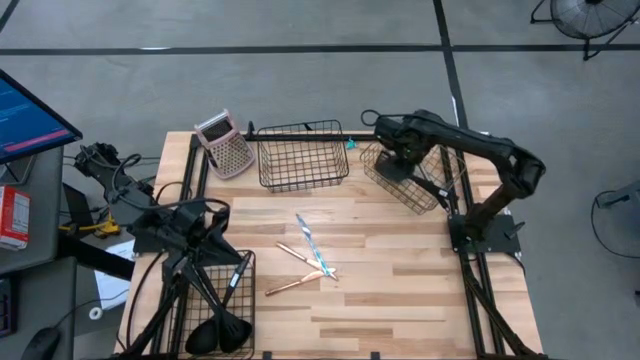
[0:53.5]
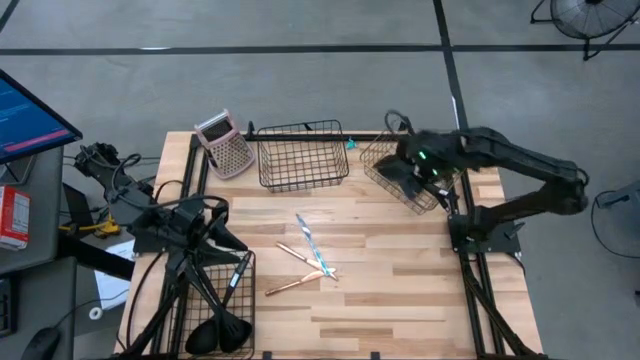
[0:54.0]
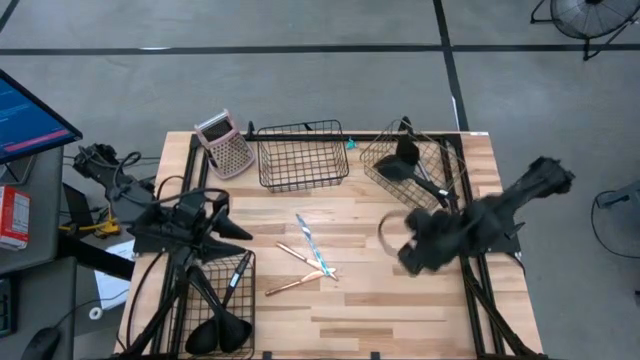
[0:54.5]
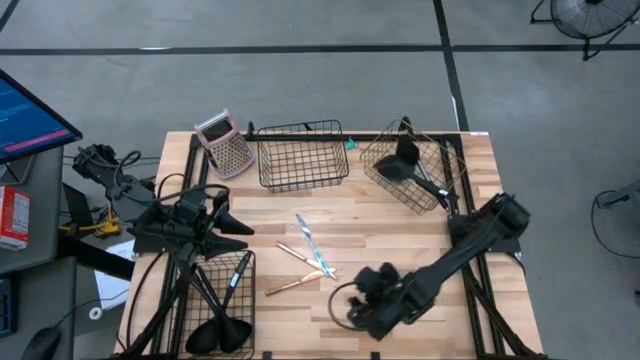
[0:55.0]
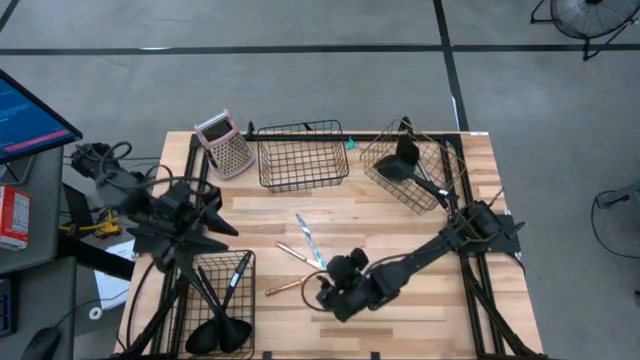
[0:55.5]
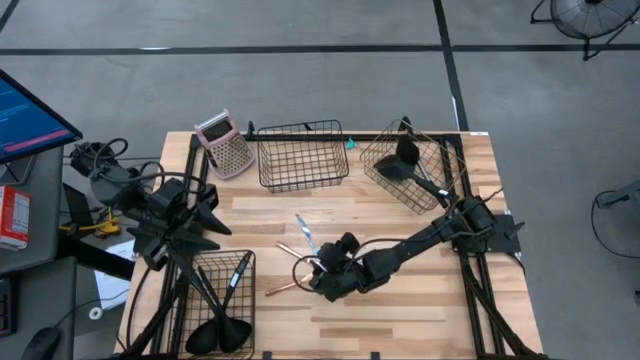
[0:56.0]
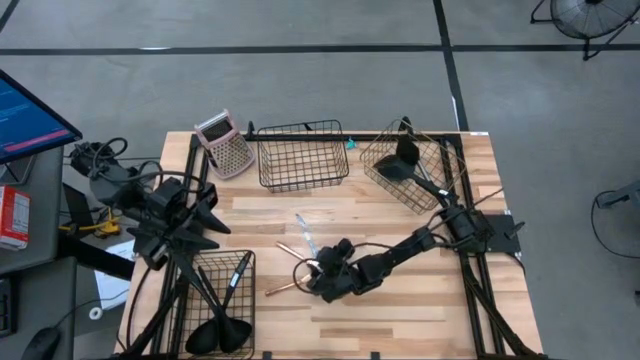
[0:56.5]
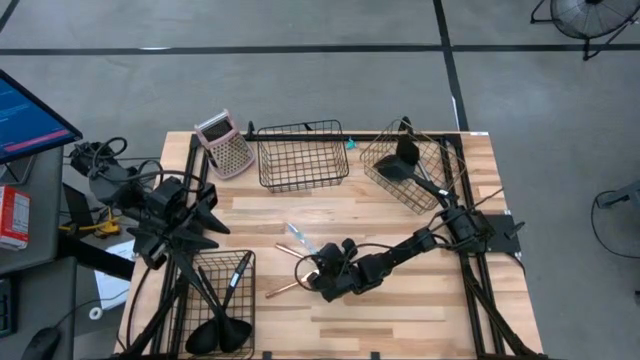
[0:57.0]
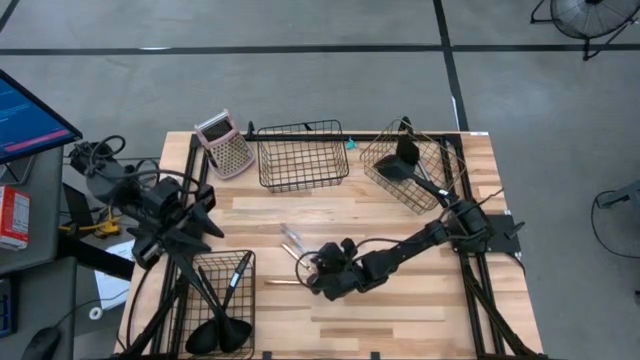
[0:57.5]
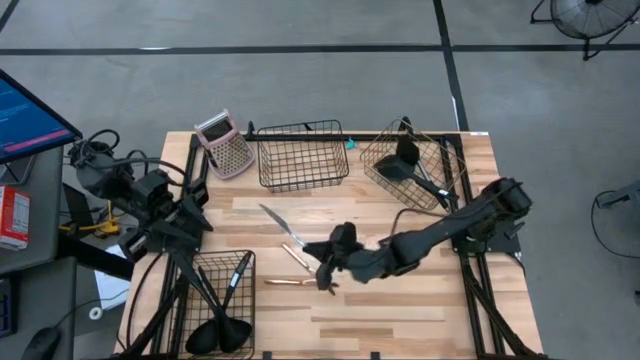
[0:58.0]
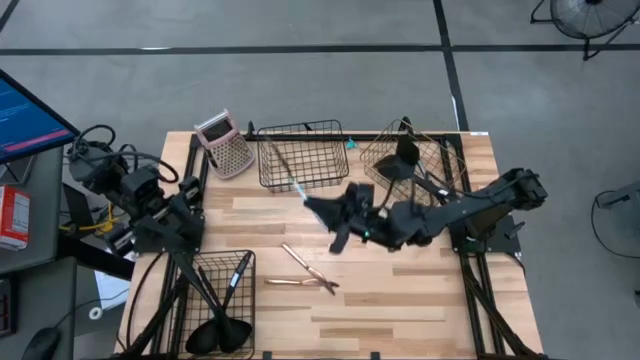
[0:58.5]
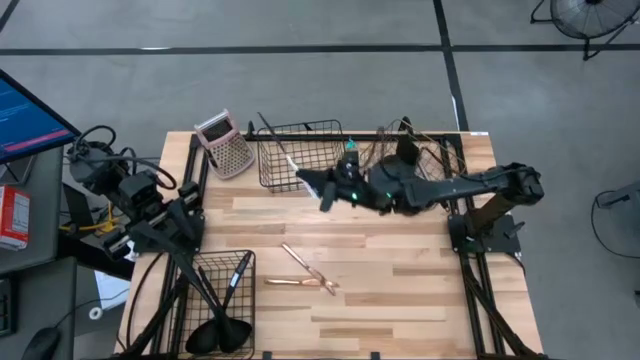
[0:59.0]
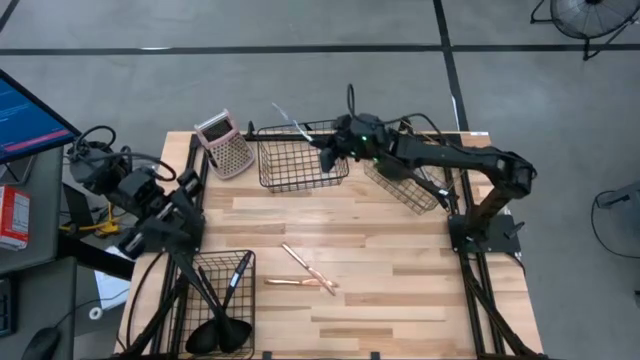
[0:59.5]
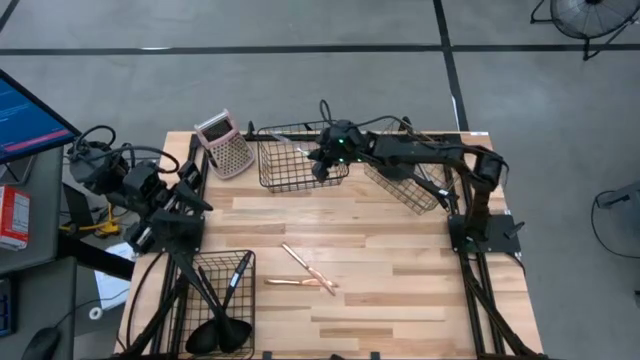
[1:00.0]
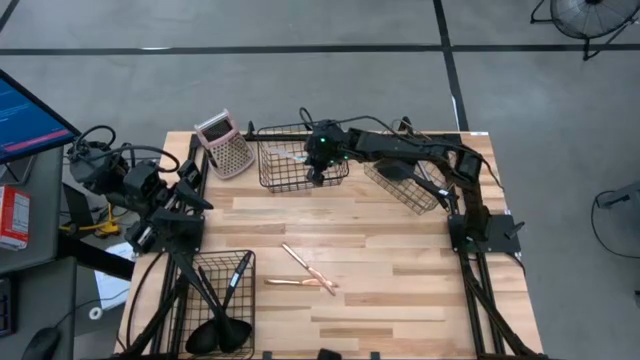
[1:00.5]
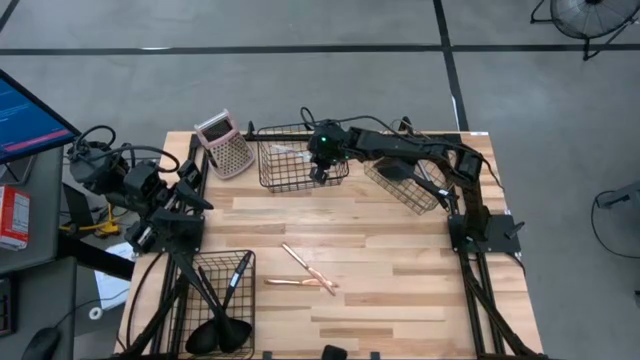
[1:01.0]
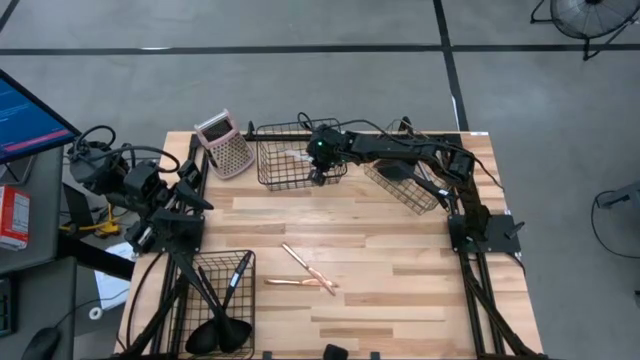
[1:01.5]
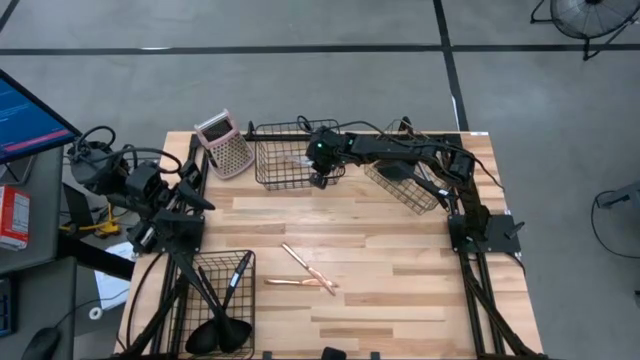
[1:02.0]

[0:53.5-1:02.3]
Task: Pick & Place Kitchen Items
Put the light blue knife into the top black wire basket

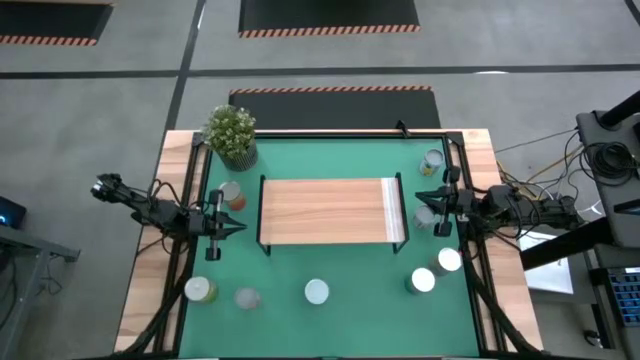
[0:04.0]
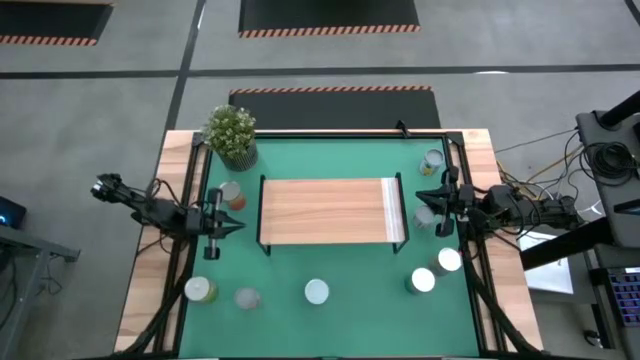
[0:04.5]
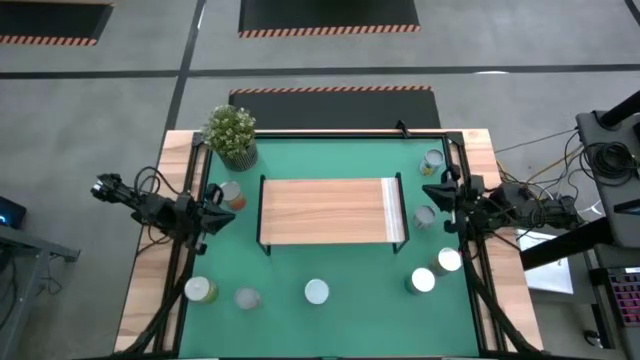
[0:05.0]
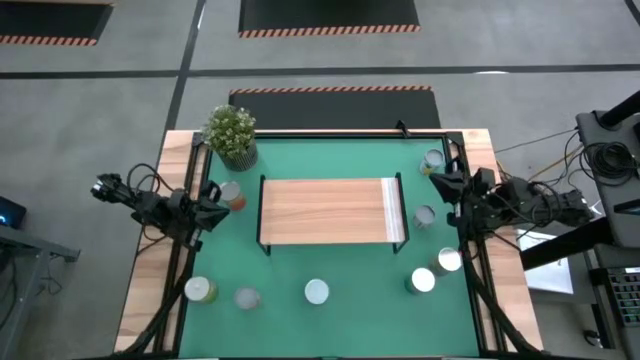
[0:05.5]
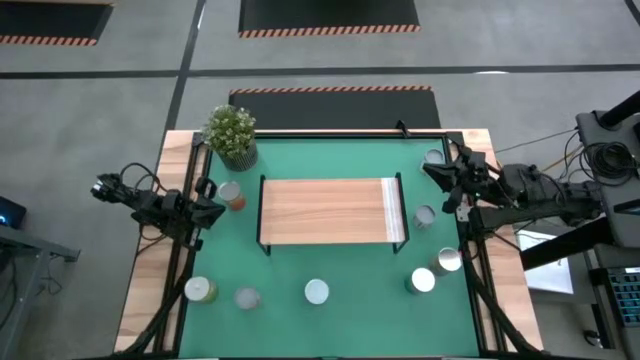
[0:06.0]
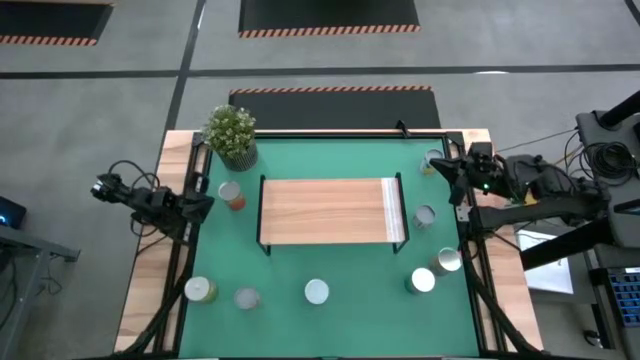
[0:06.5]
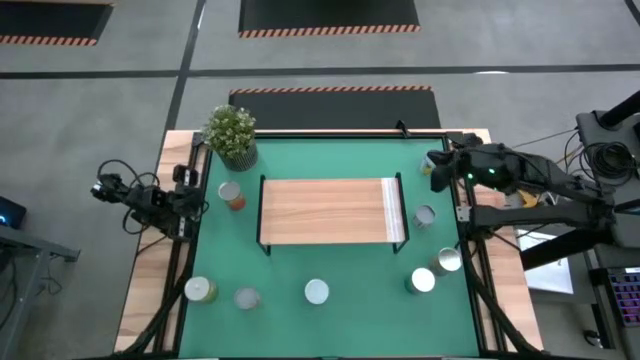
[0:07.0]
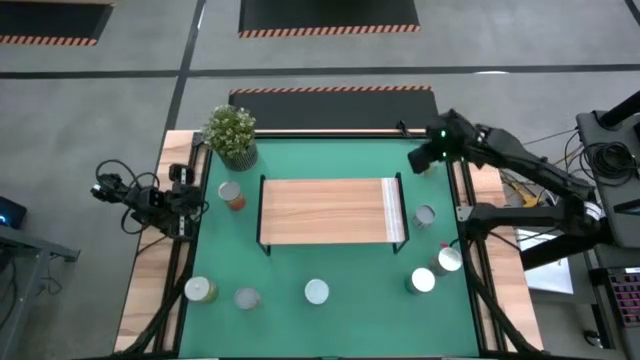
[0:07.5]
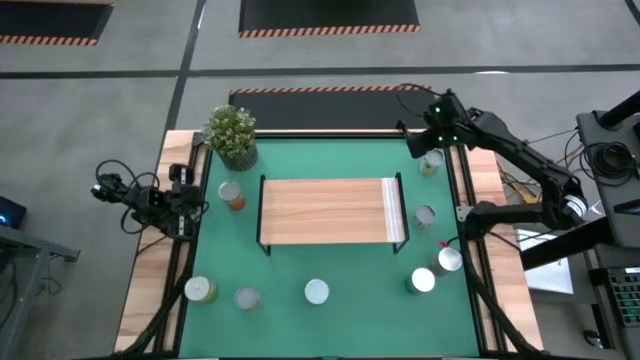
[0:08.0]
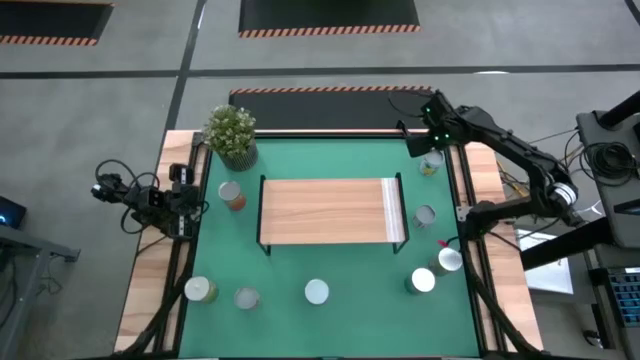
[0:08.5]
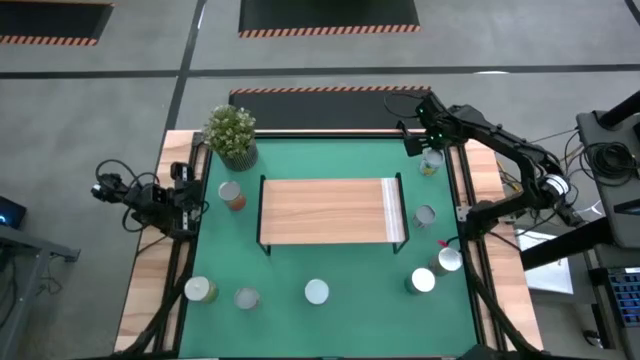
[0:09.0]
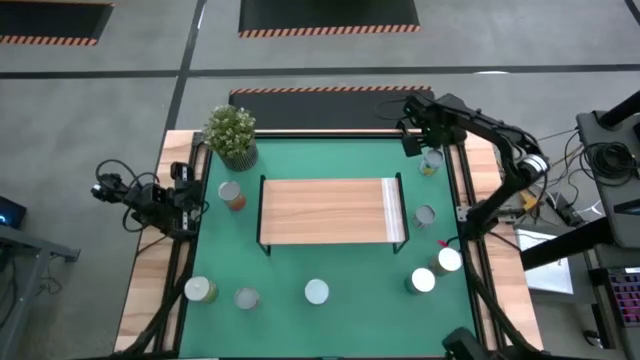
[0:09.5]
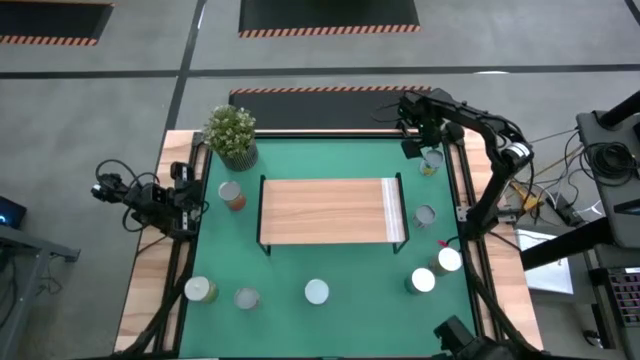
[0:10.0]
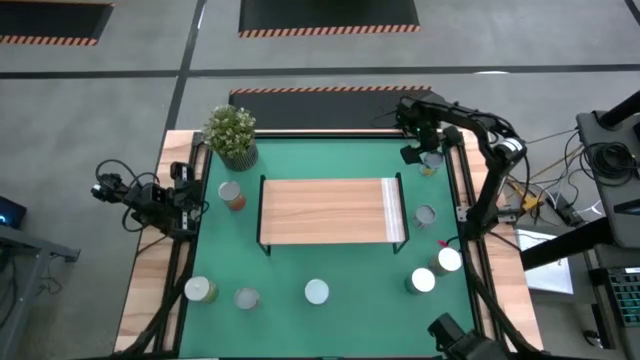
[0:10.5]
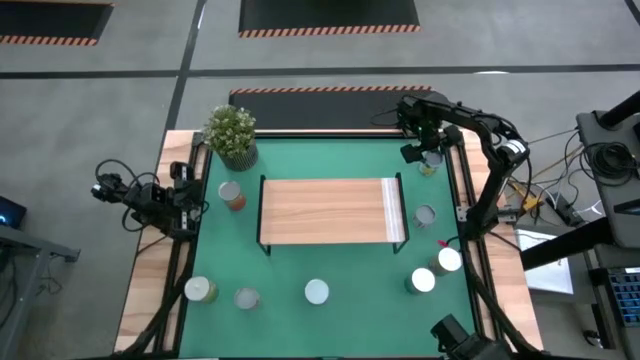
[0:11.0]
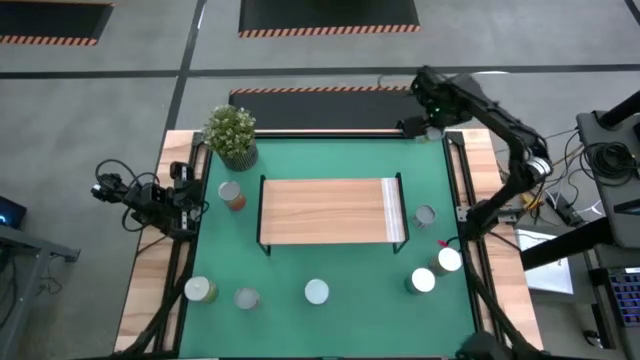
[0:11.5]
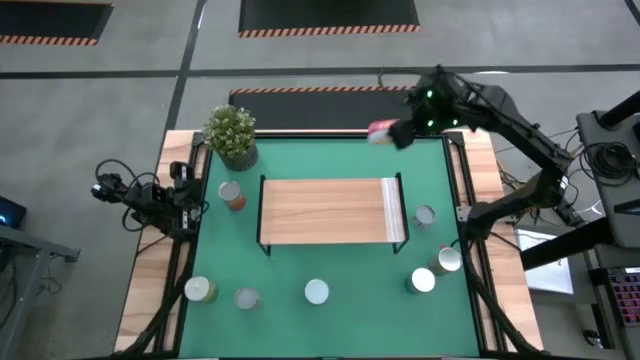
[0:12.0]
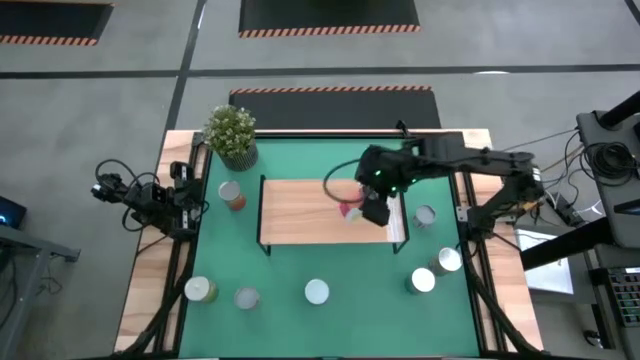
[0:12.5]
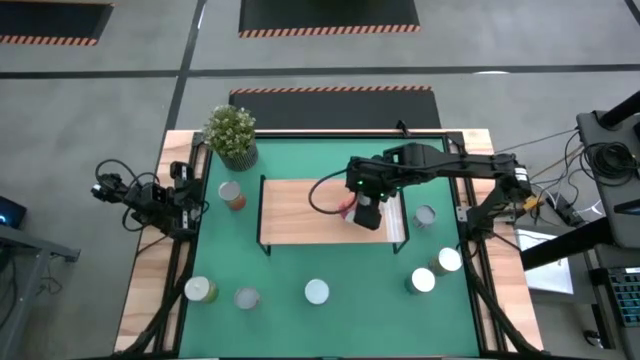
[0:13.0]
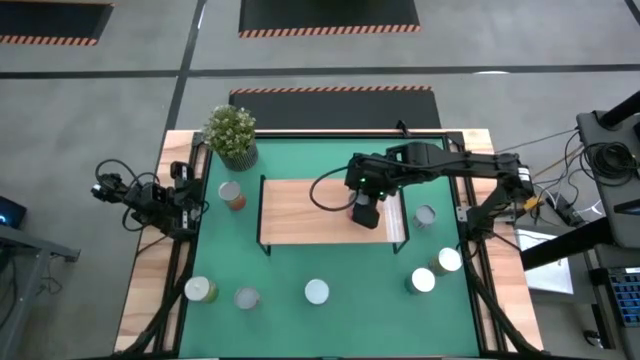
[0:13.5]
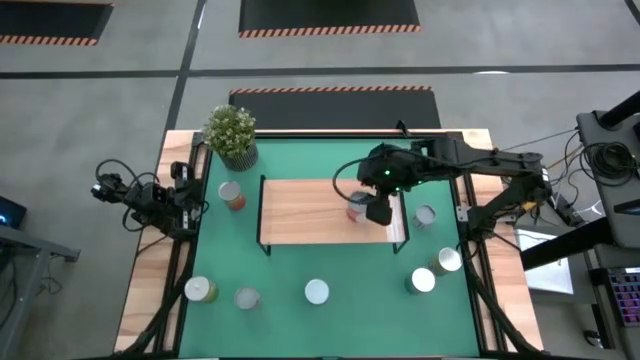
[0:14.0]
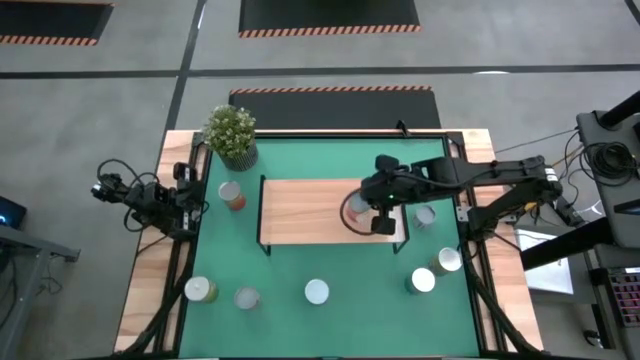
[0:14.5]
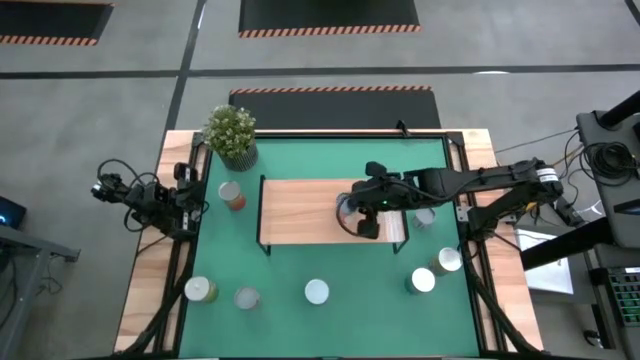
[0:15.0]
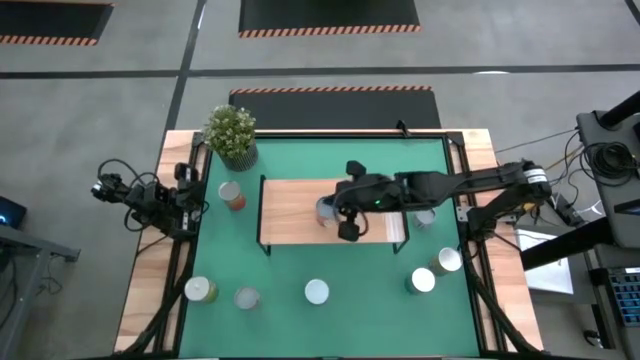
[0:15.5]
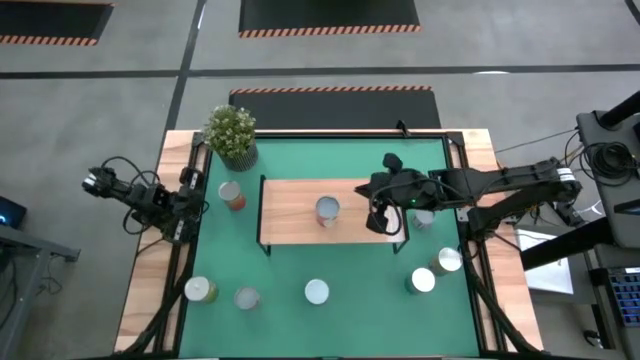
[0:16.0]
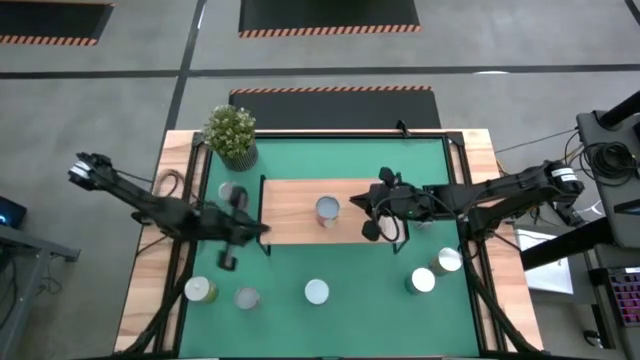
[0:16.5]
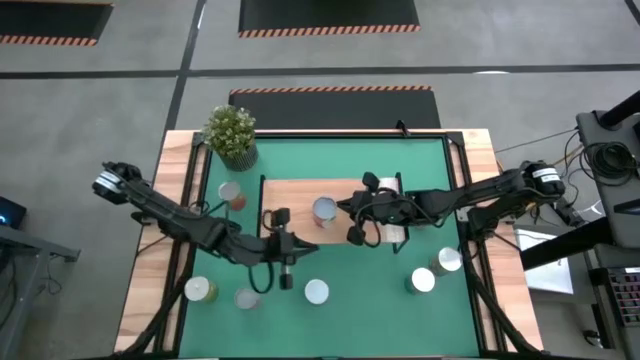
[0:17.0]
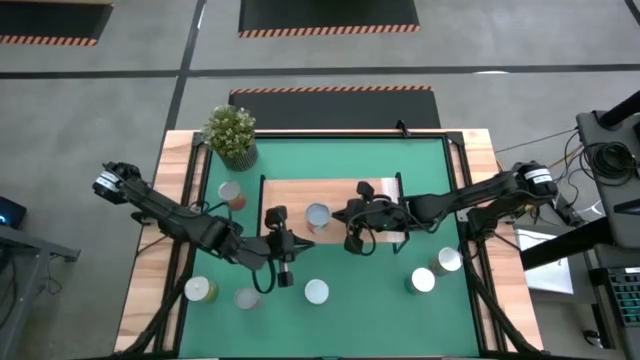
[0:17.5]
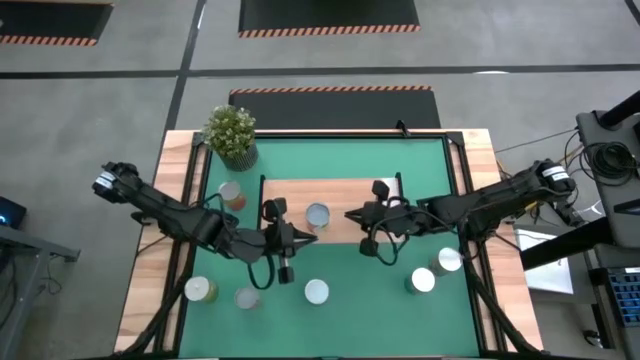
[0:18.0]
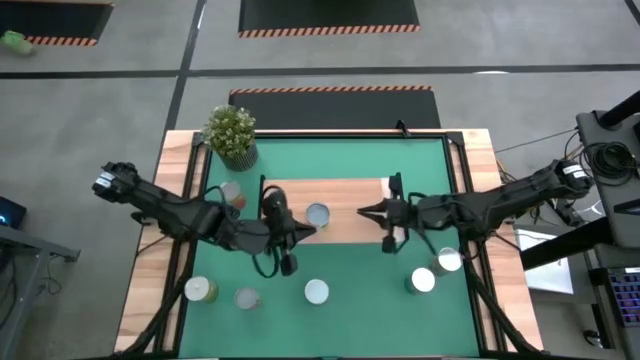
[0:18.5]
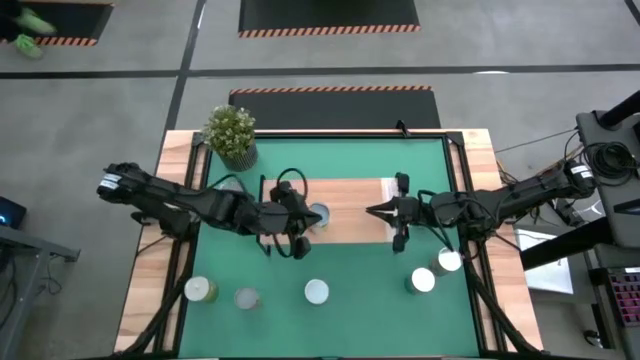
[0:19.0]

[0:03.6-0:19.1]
Task: Pick and place cans onto a shelf
Put the canned of mixed fruits on the shelf
